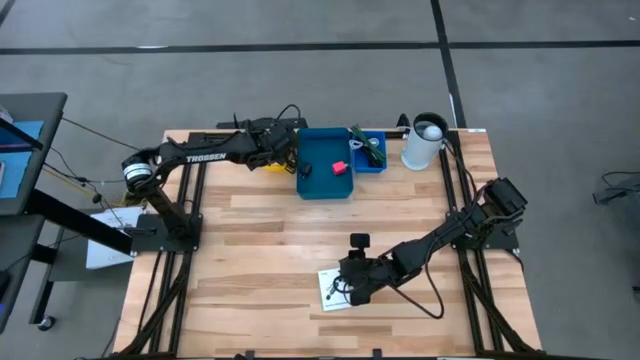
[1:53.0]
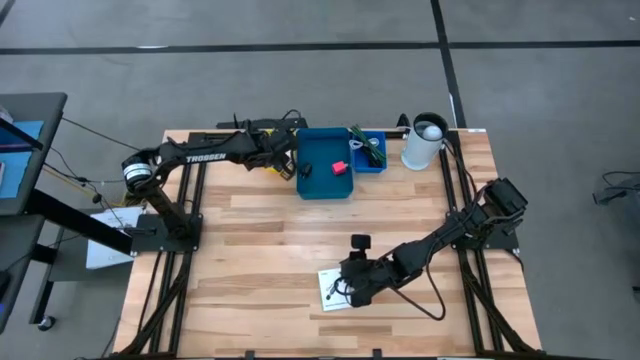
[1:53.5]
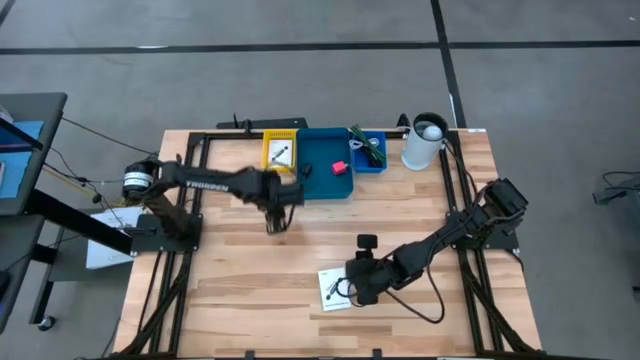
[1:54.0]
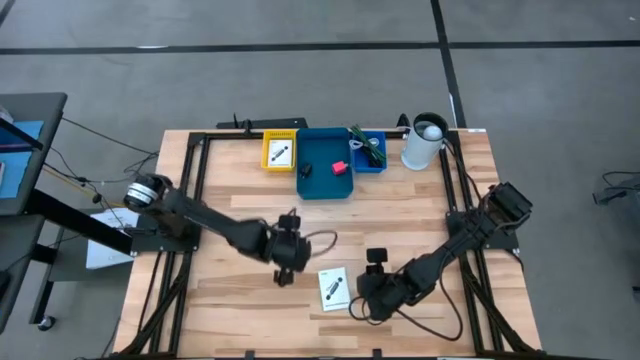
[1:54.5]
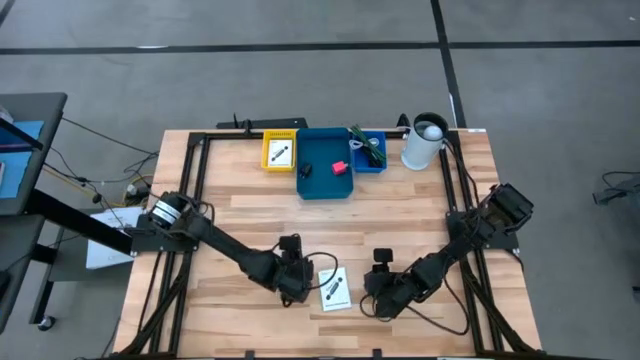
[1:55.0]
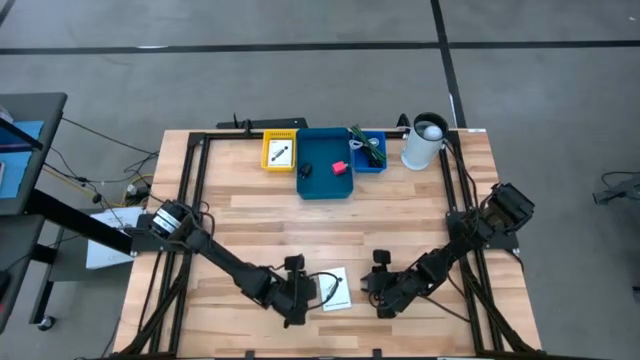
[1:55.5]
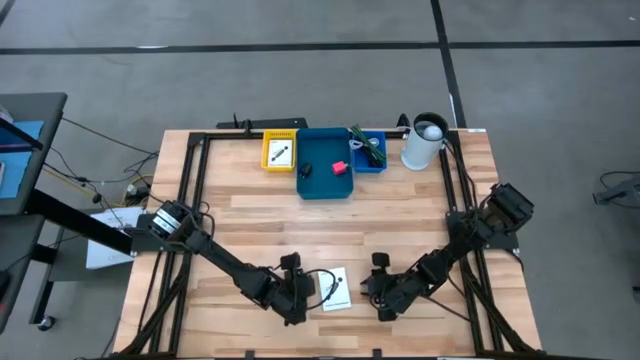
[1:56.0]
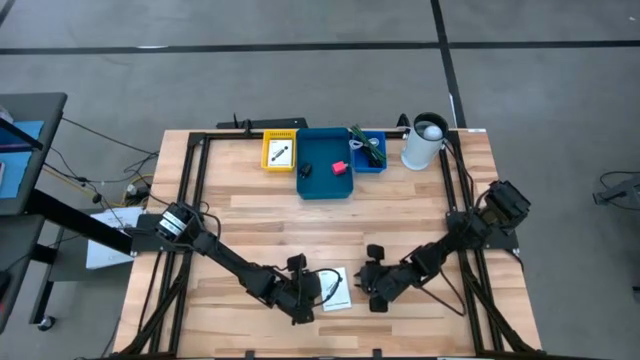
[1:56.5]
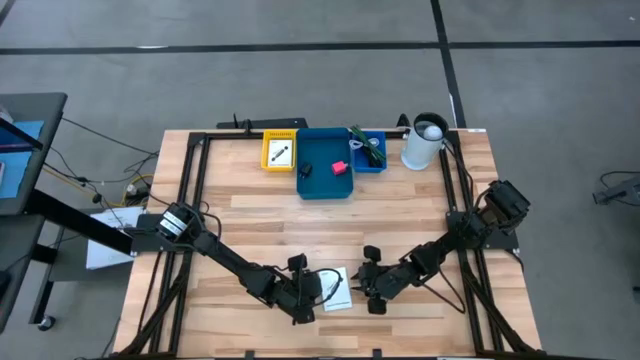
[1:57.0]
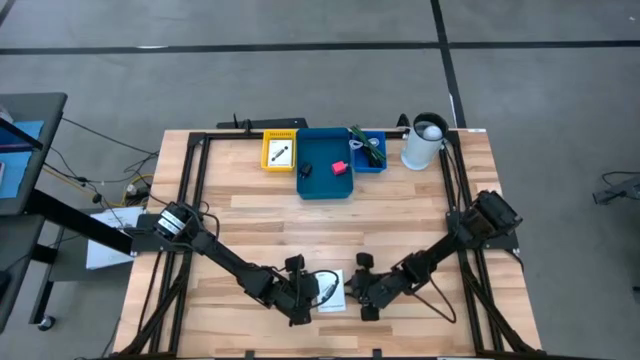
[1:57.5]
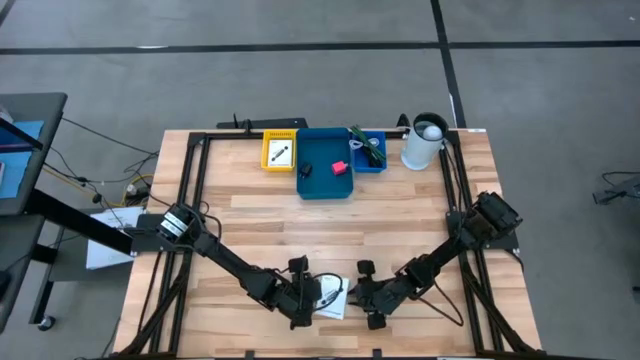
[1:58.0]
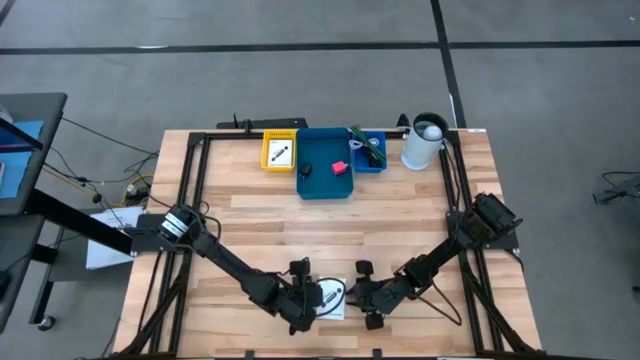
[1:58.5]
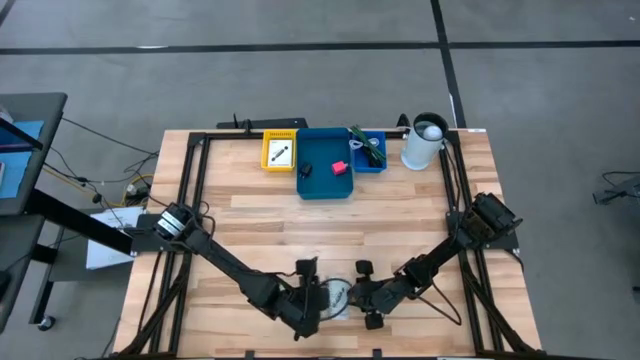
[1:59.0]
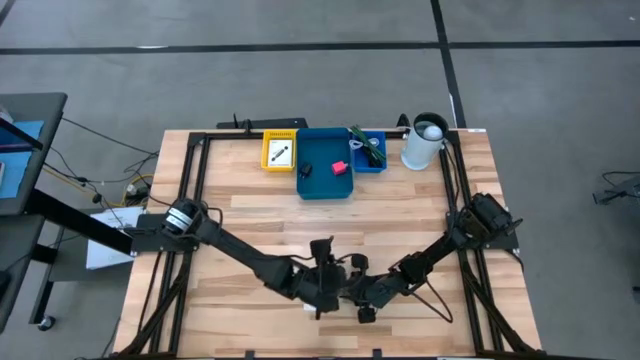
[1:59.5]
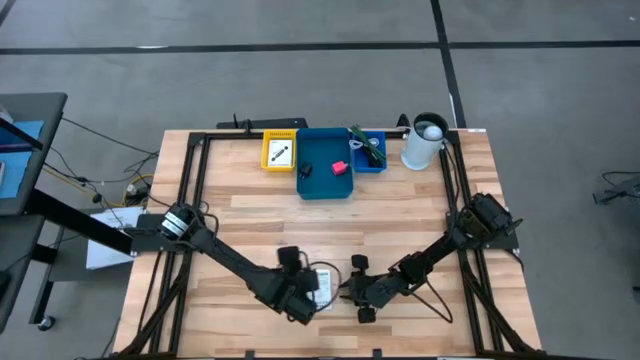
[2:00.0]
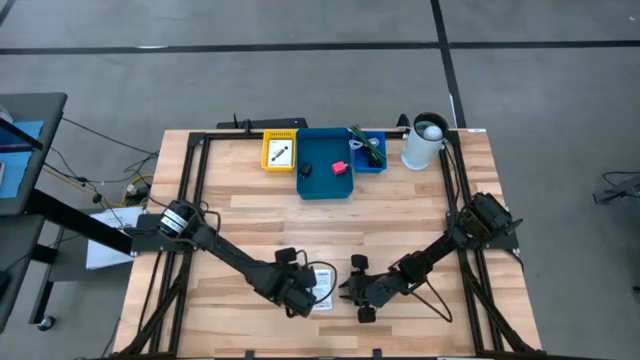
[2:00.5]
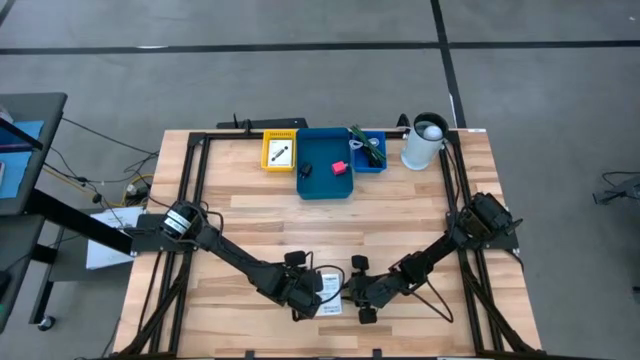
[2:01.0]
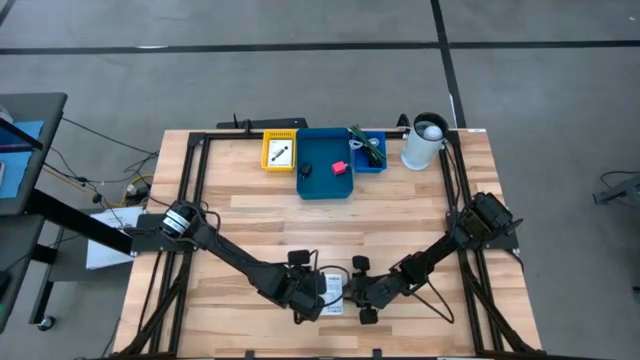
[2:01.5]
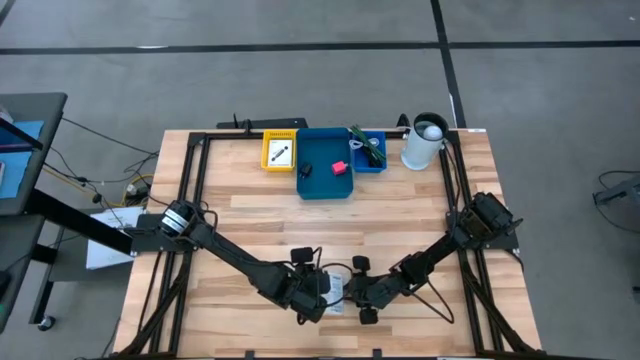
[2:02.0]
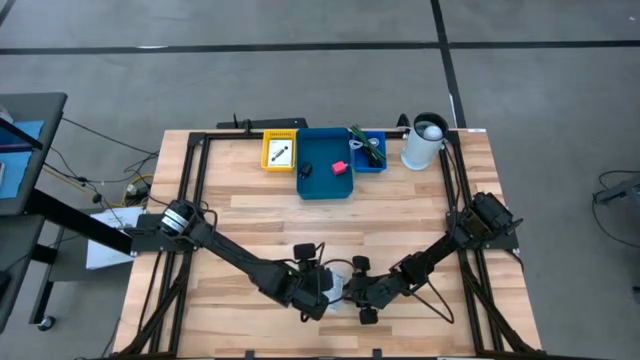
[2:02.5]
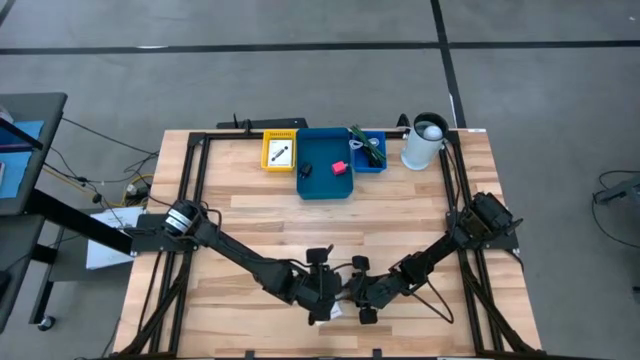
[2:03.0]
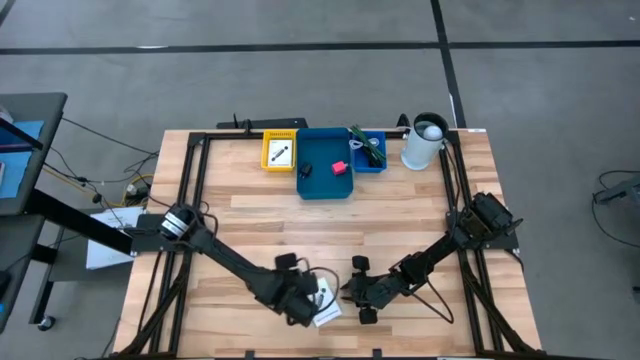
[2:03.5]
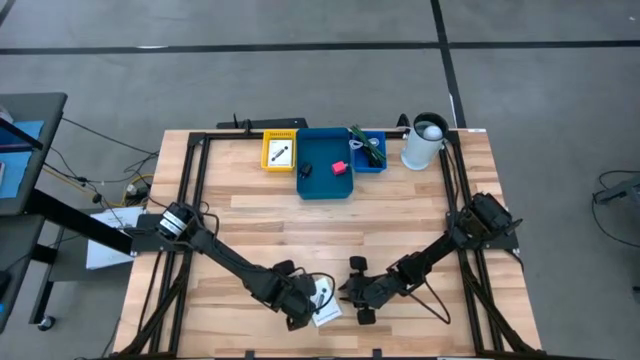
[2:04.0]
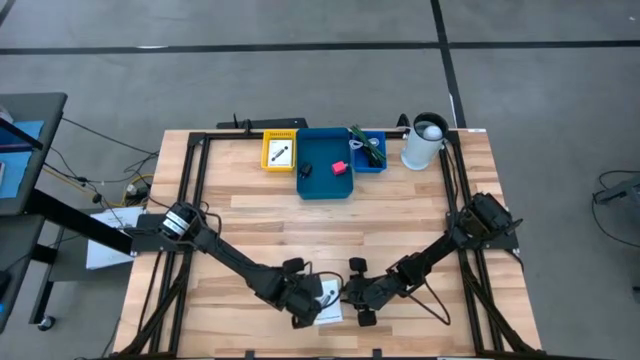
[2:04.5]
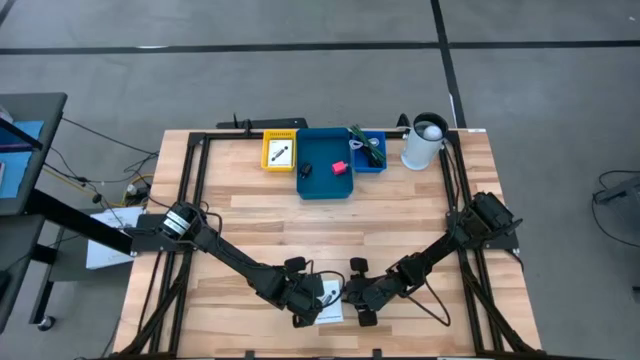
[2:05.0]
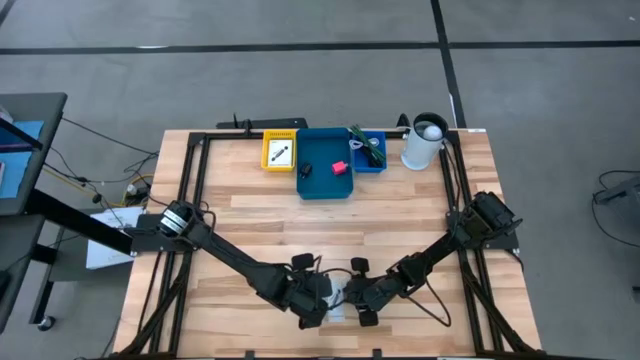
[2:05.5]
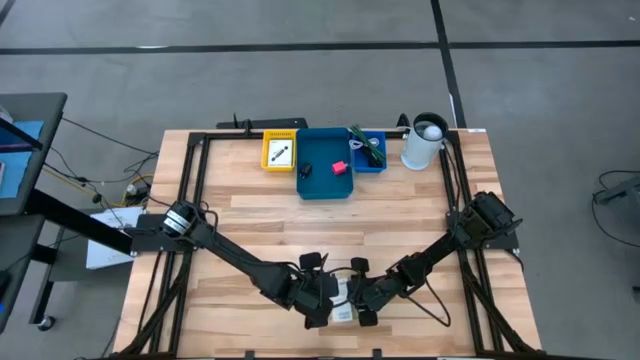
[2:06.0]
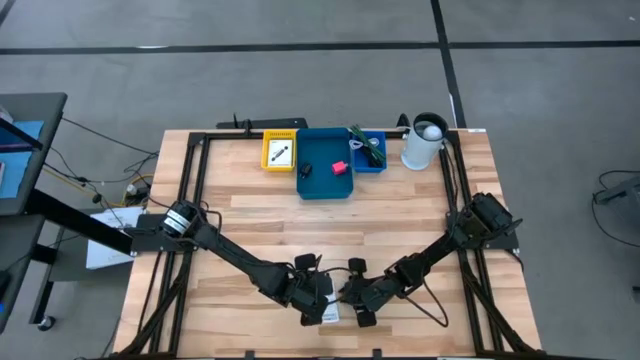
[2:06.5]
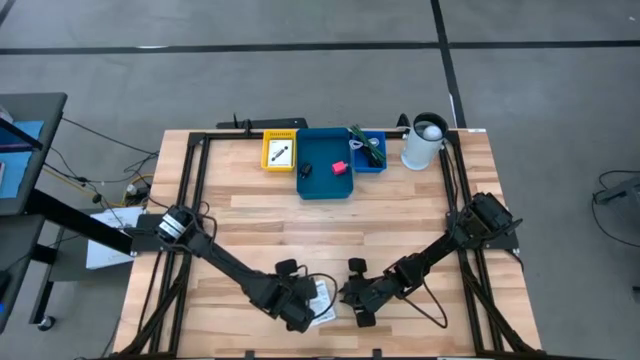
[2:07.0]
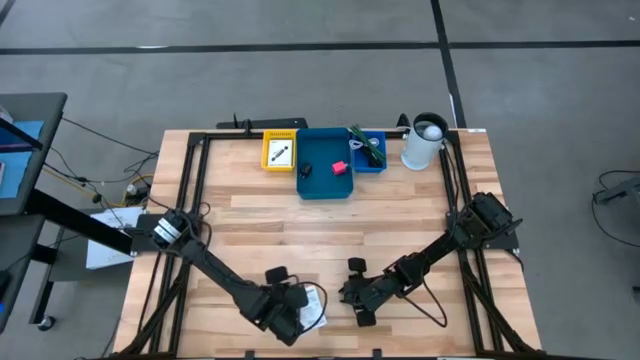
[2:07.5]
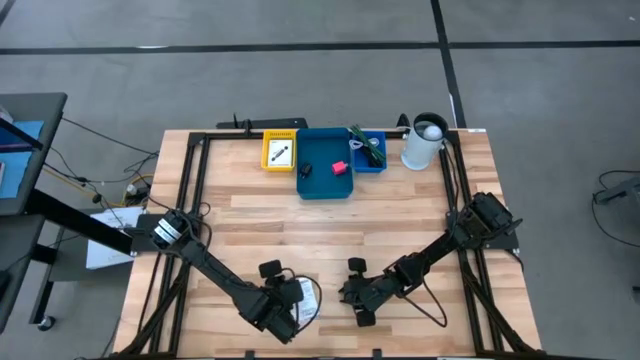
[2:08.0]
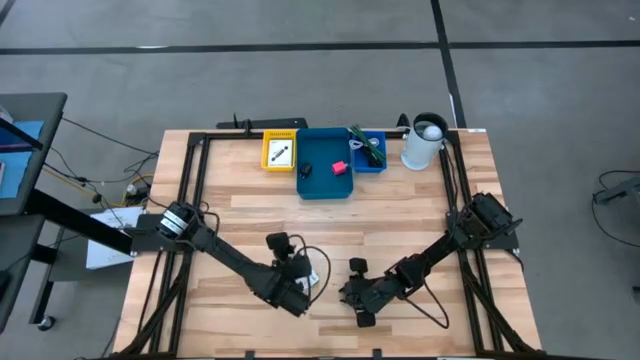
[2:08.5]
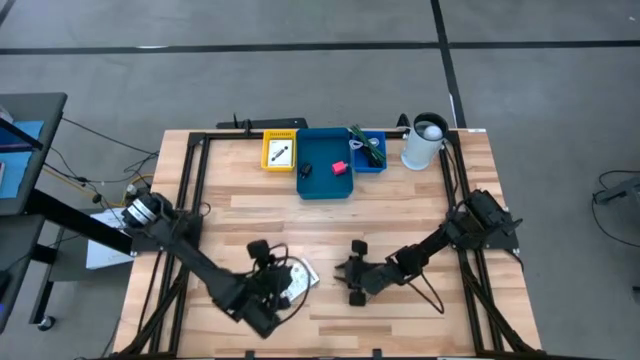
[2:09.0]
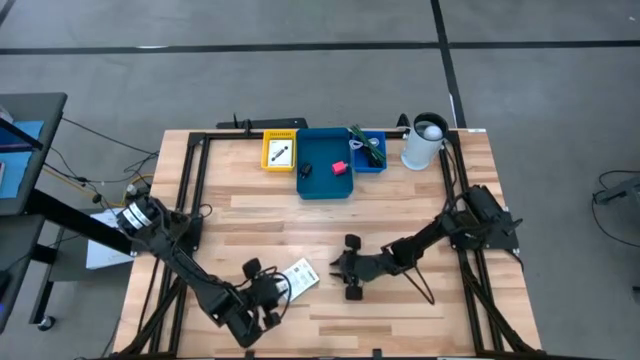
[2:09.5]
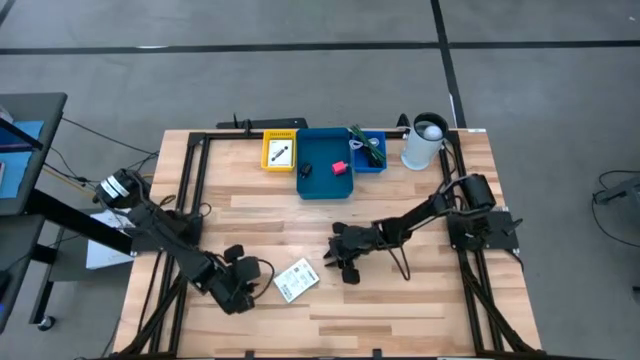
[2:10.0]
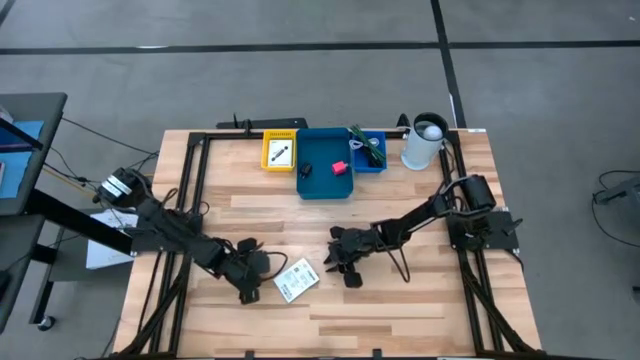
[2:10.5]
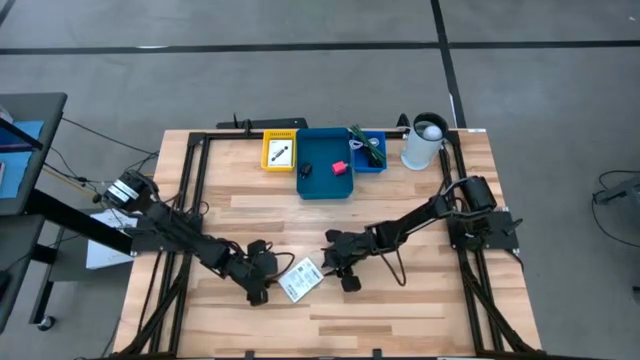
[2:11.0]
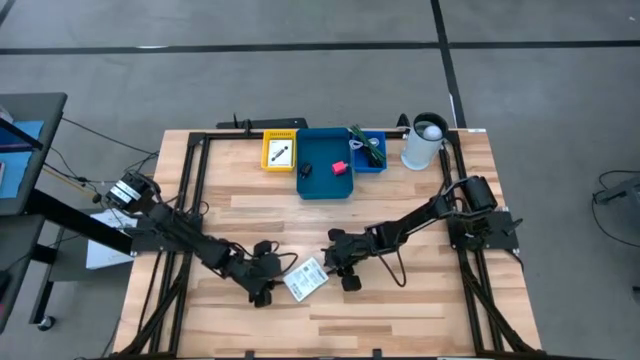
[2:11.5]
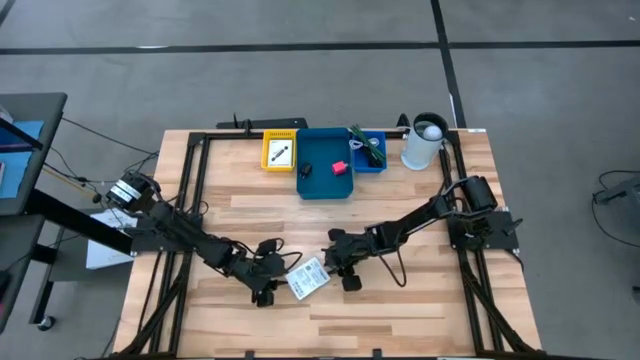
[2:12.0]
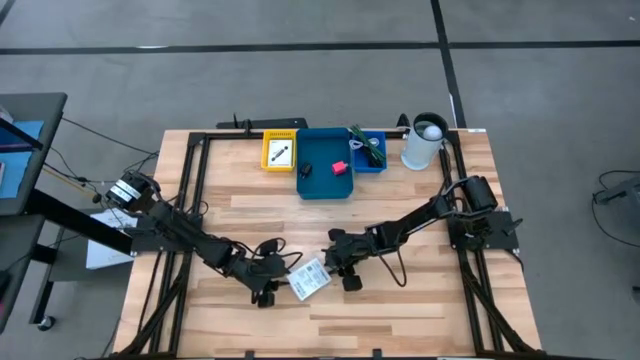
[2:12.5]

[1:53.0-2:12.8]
Task: Pick and place items into bin
Put the card reader box into the yellow basket
